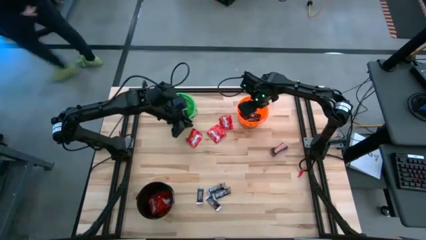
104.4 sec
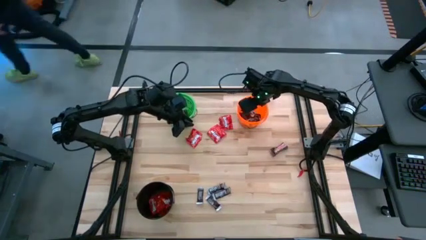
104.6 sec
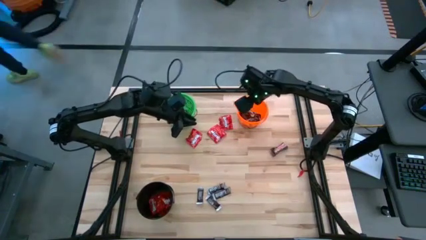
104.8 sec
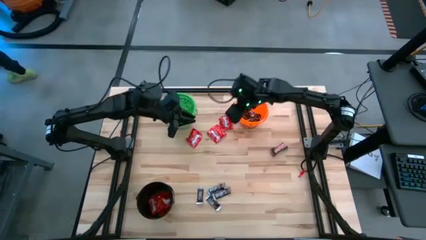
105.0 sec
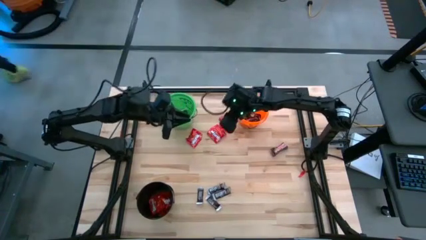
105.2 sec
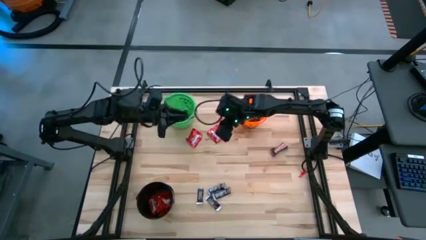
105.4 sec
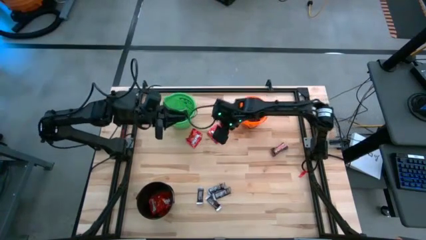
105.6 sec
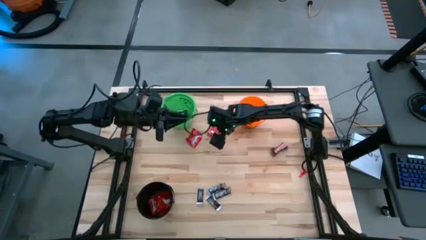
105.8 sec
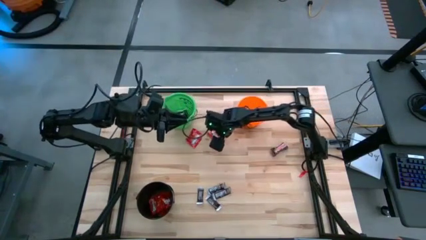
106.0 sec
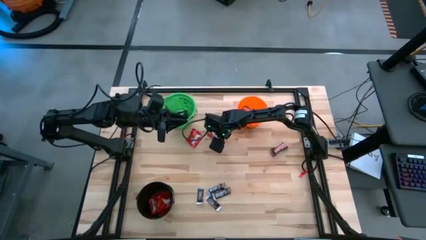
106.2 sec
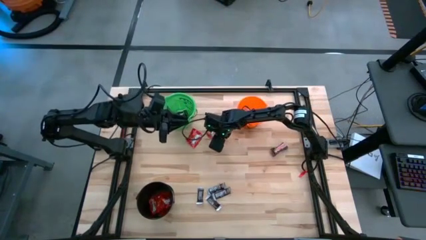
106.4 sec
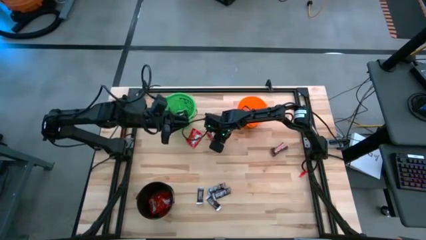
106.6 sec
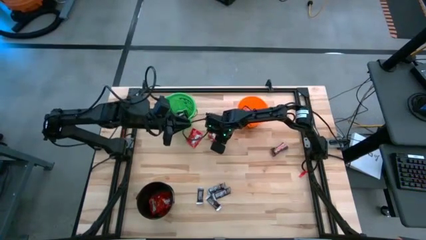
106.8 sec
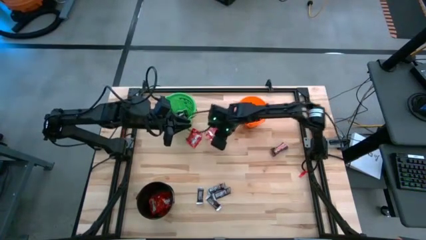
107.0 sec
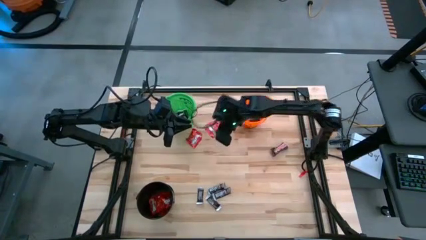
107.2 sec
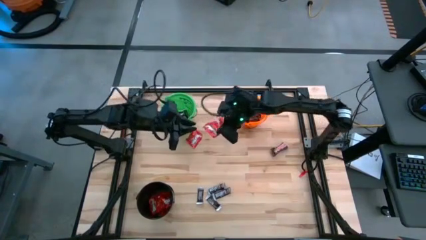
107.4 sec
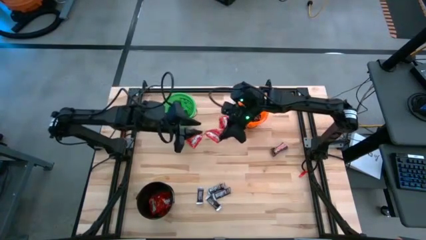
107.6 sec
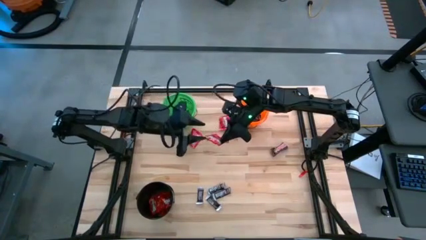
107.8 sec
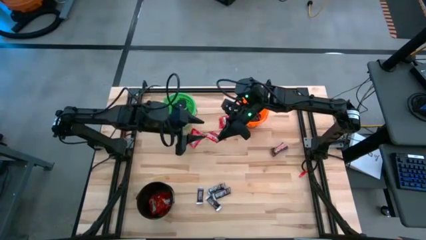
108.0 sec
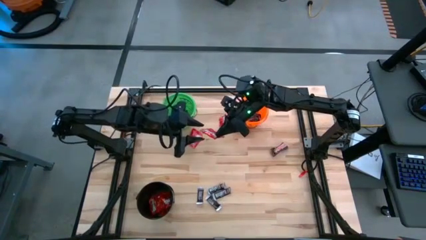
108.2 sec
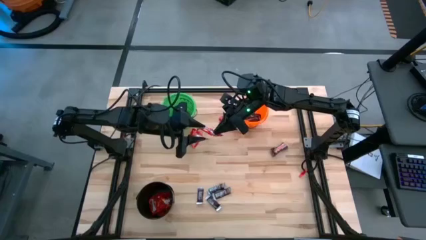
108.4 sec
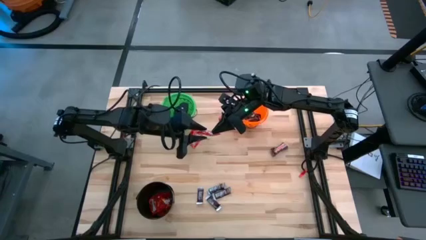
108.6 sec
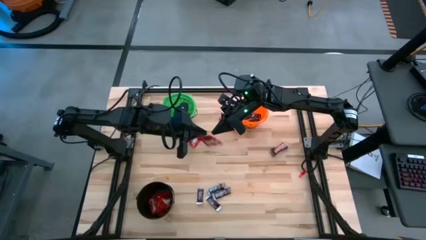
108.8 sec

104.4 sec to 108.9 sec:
Task: Sort candy
Put the red candy into the black bucket

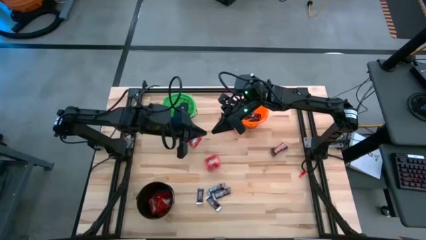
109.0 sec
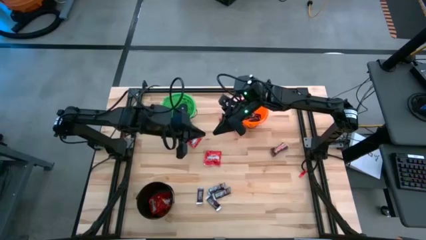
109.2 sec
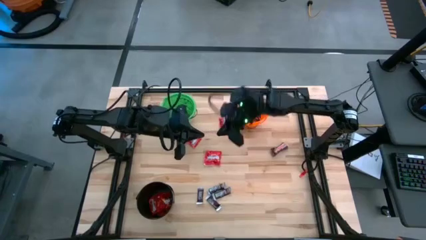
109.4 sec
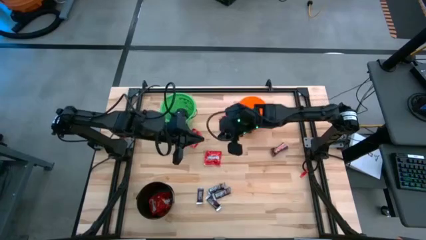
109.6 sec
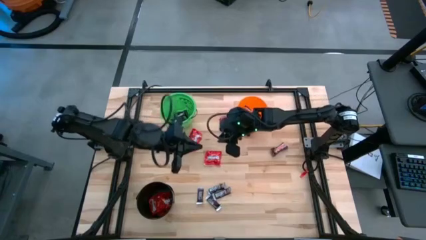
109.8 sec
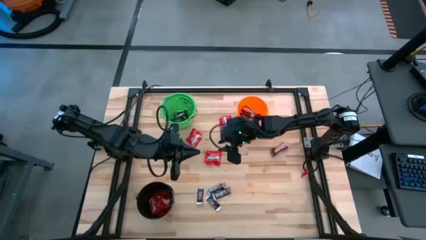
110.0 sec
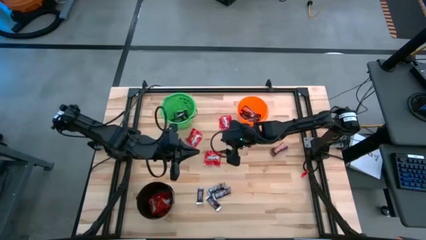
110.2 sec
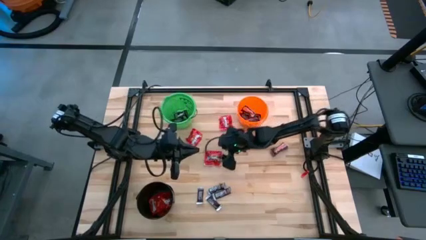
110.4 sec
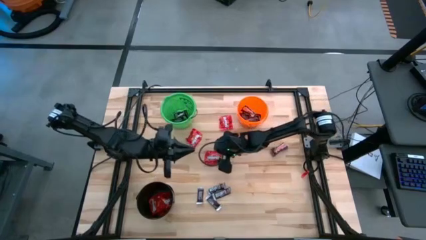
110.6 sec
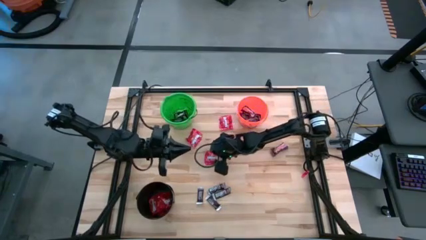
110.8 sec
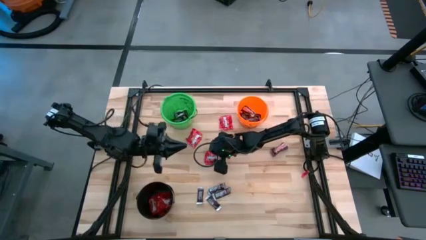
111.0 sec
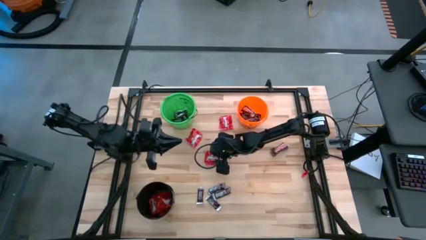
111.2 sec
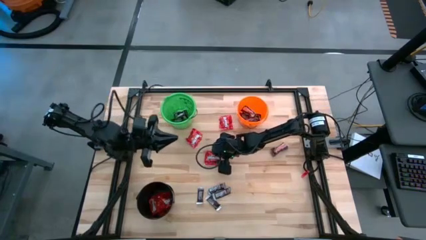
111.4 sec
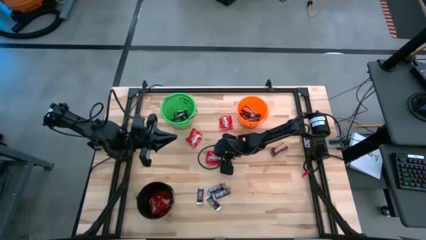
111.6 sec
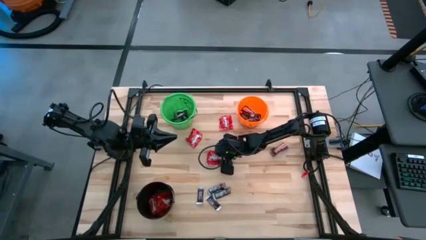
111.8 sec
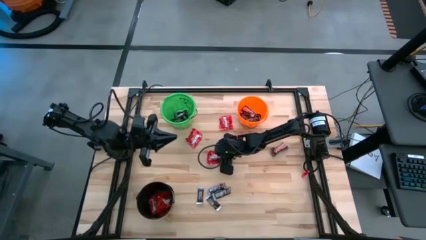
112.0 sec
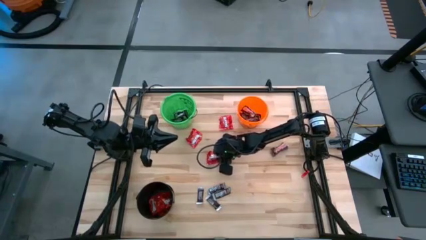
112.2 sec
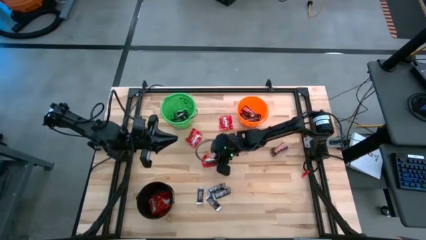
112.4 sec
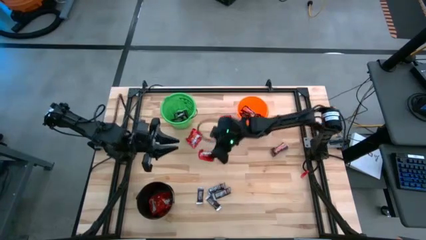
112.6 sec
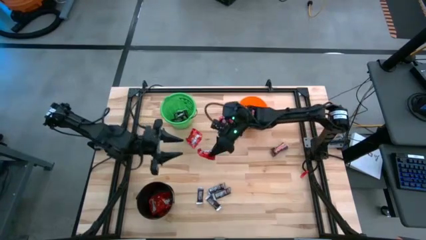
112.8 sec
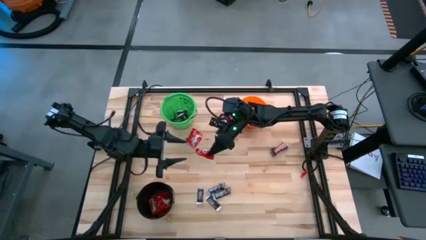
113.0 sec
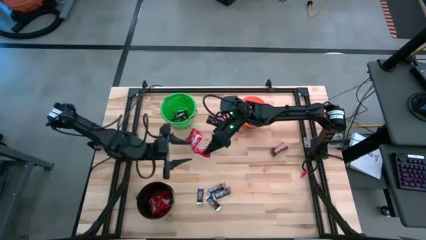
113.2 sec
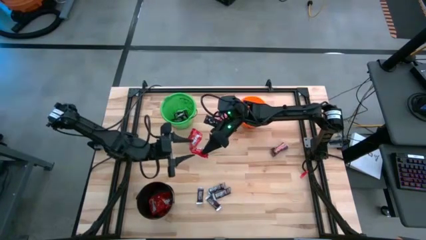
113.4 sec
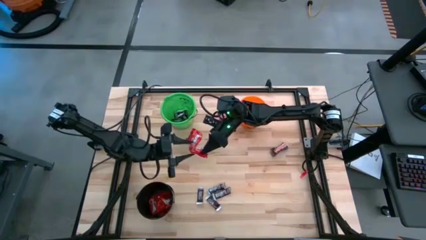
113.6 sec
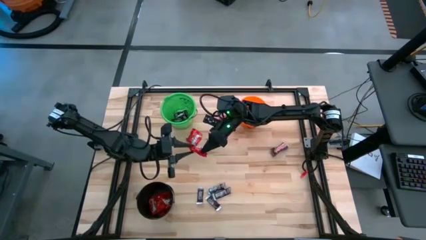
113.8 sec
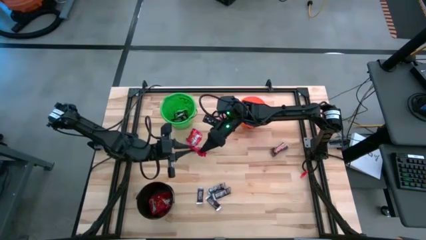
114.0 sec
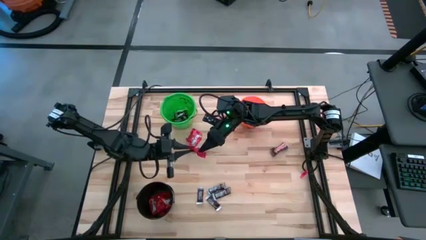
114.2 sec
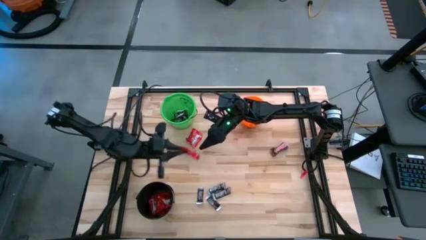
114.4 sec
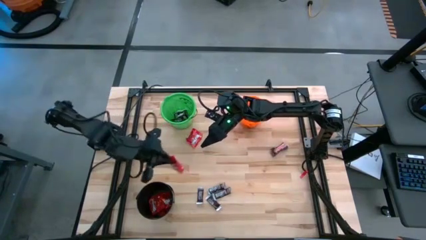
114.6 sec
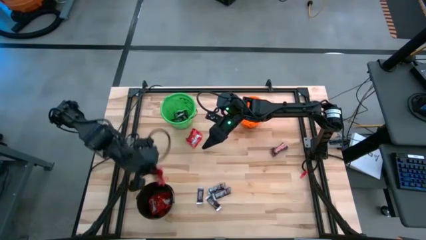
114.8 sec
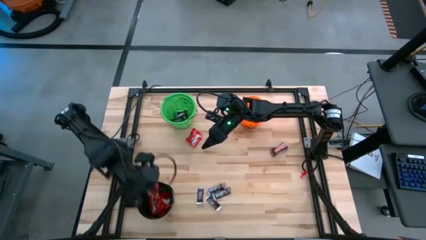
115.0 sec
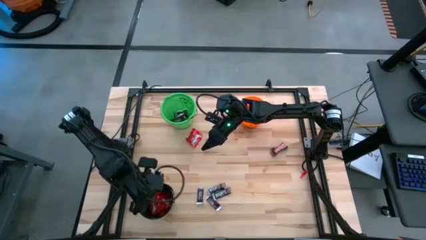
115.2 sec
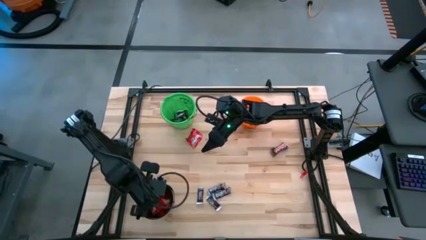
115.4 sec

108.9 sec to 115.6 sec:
Put the red candy into the black bucket

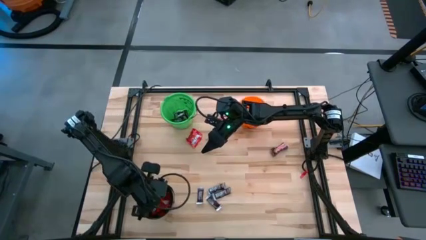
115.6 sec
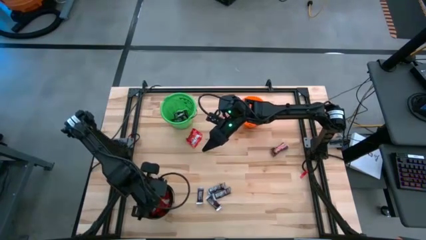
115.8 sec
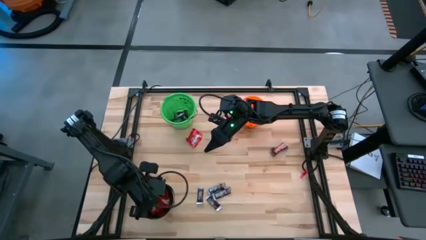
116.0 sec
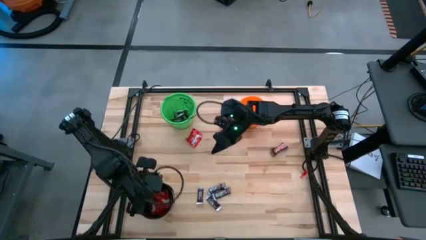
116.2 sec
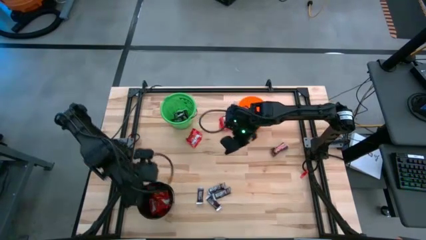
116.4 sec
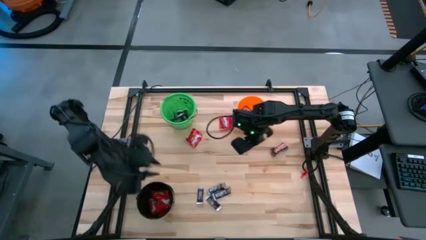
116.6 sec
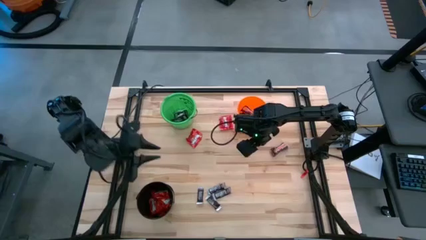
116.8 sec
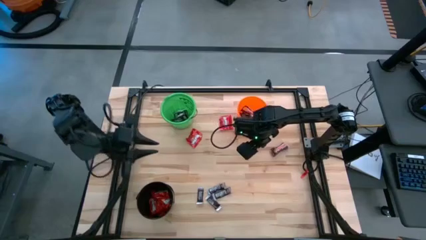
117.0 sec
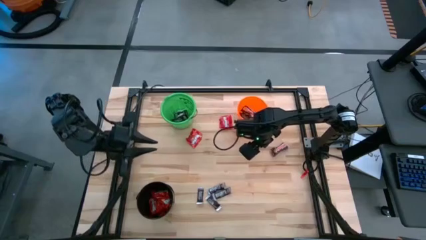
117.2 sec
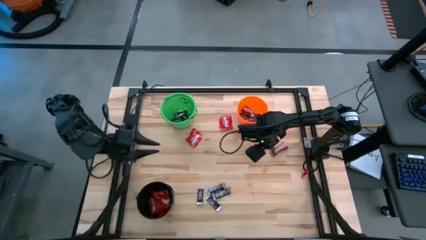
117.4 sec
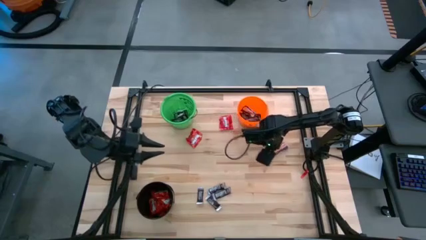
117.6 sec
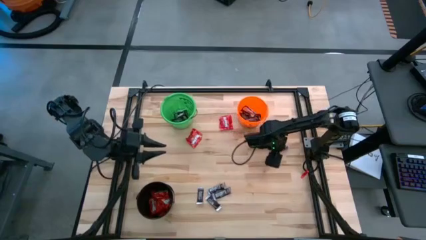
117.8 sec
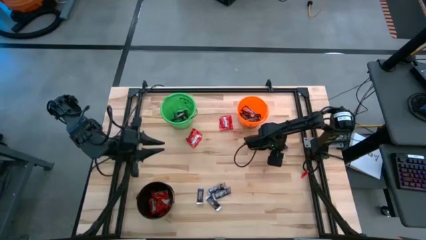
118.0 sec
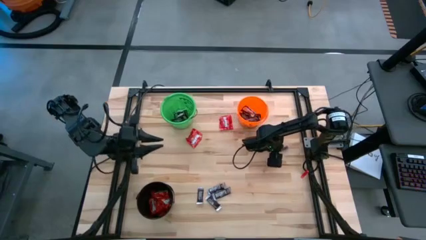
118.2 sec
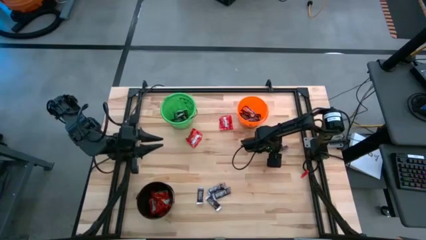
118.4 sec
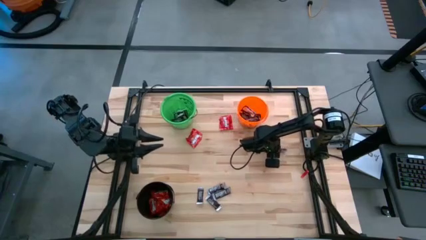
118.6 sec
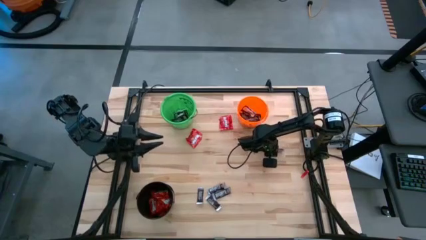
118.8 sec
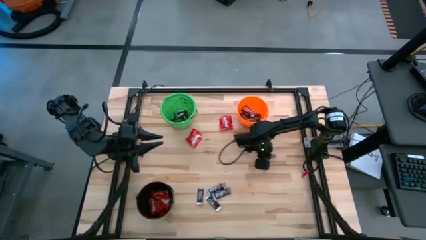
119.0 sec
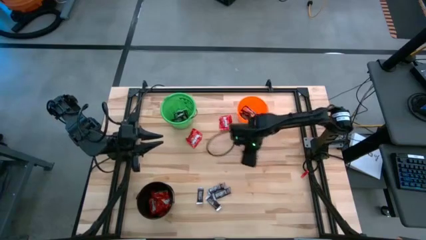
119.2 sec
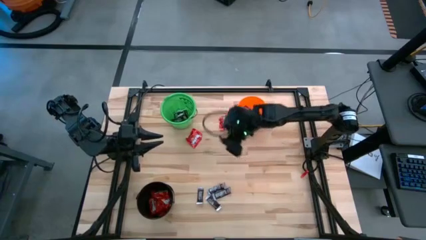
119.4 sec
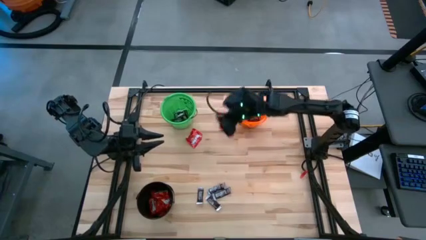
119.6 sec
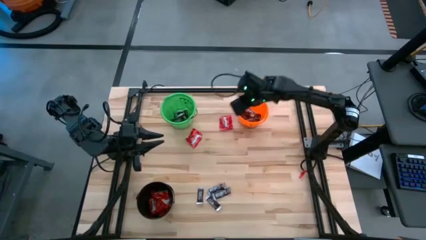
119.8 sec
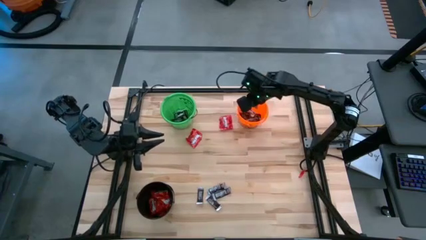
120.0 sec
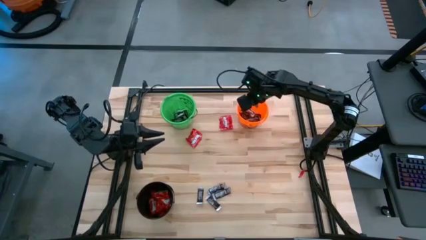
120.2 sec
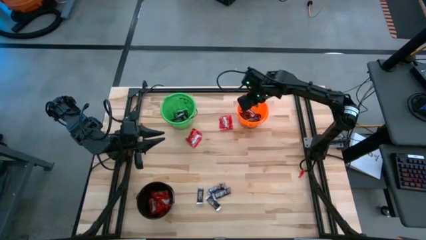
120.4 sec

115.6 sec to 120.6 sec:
Put the brown chocolate into the orange bucket
